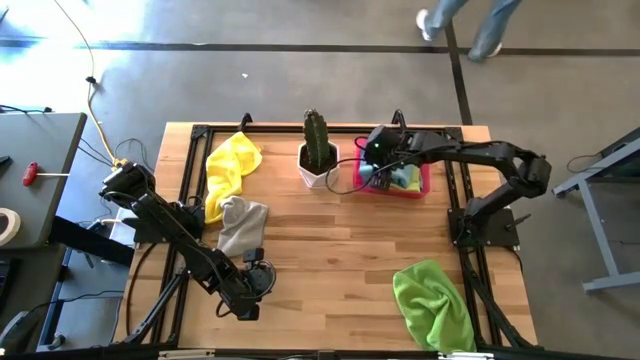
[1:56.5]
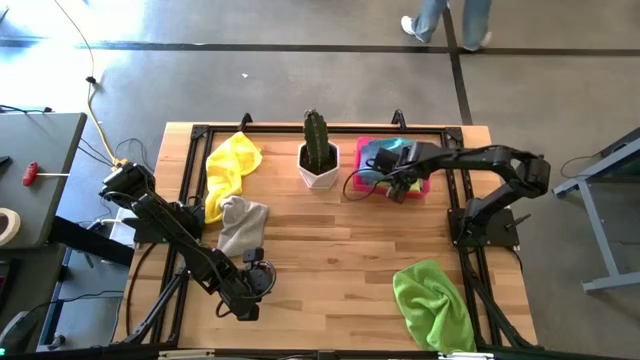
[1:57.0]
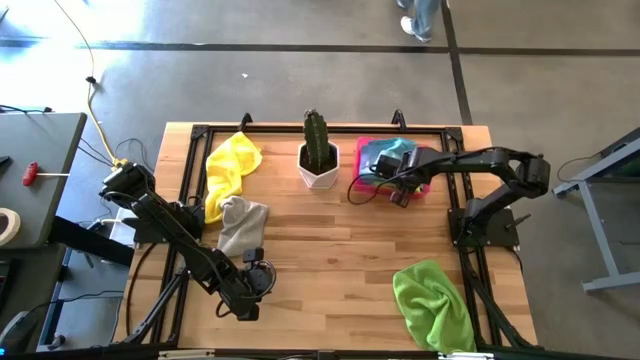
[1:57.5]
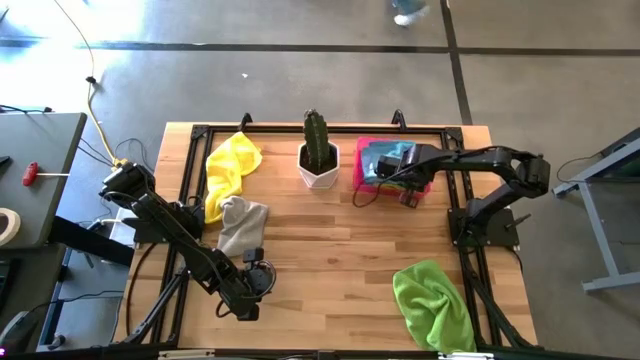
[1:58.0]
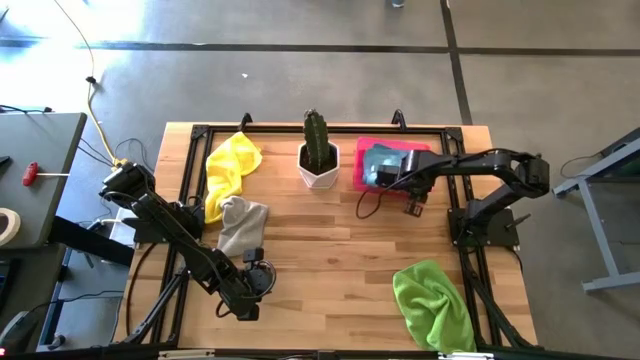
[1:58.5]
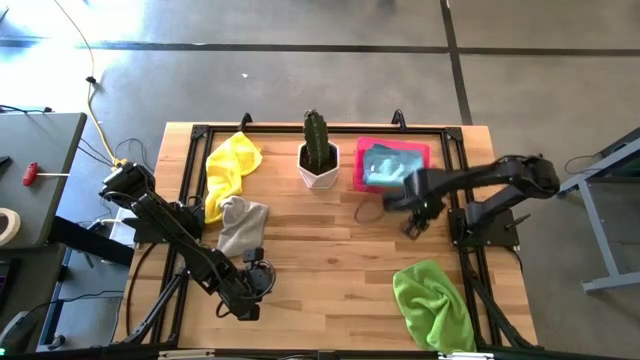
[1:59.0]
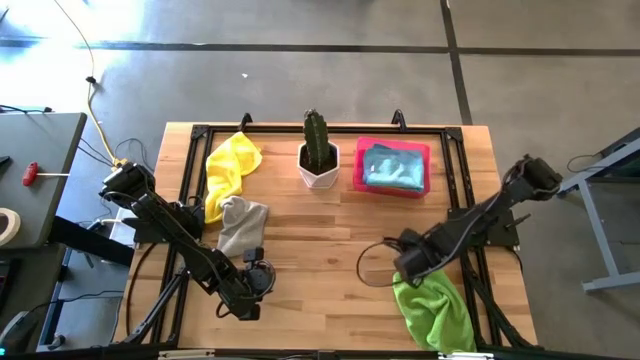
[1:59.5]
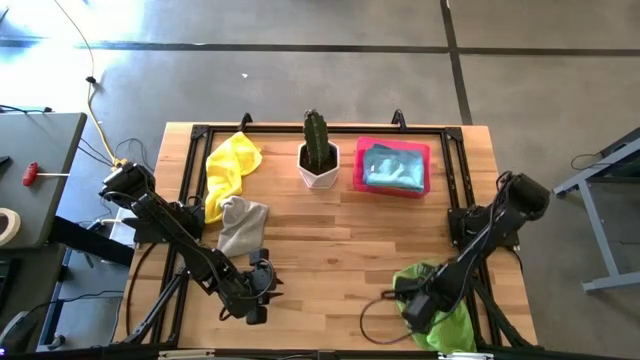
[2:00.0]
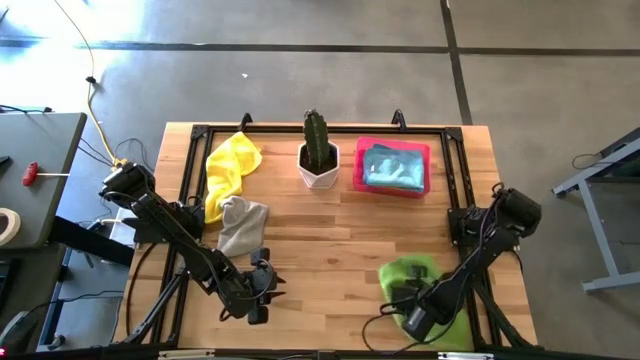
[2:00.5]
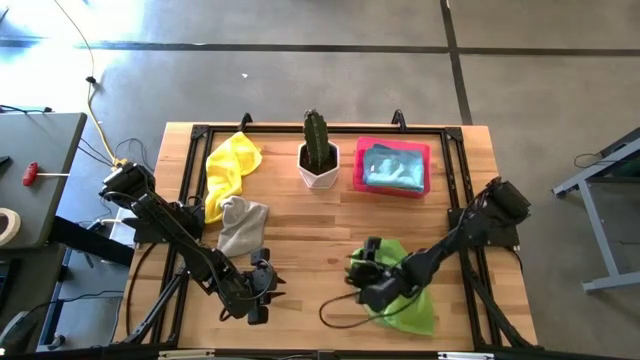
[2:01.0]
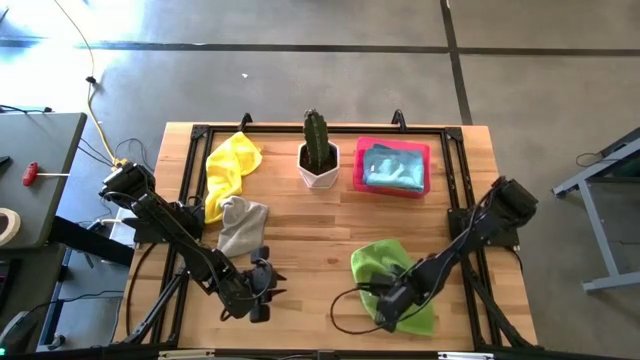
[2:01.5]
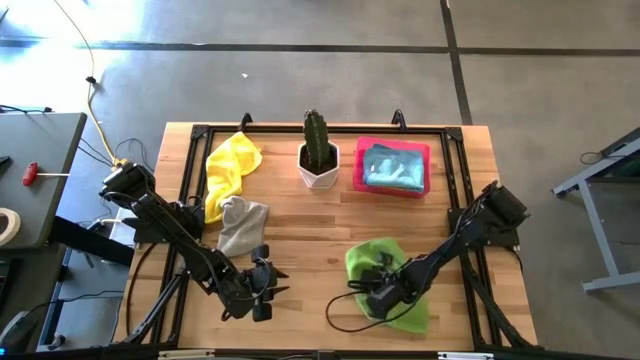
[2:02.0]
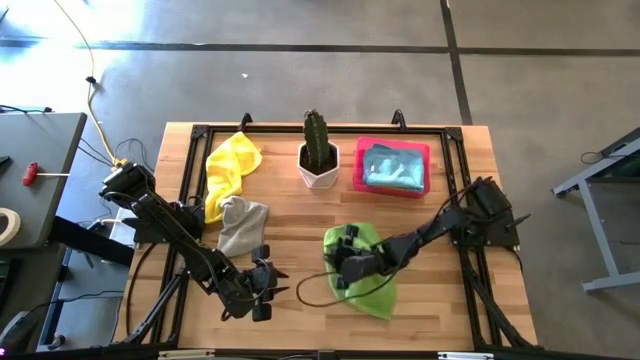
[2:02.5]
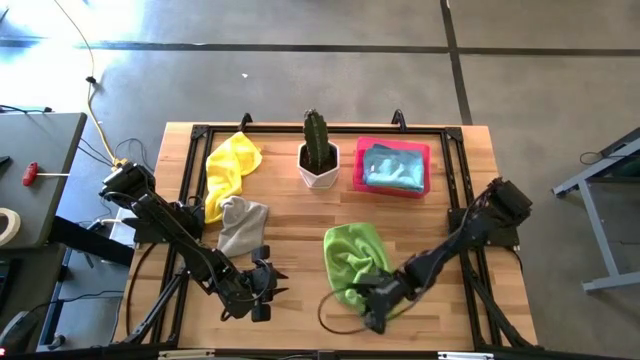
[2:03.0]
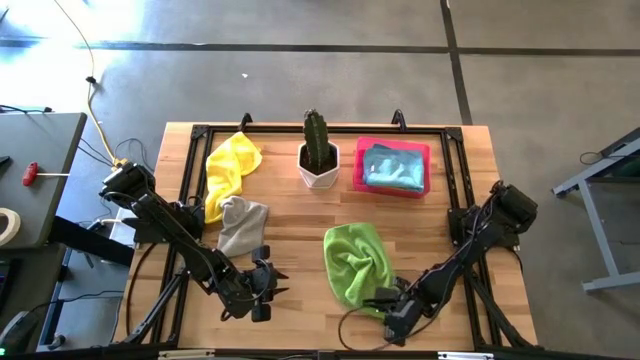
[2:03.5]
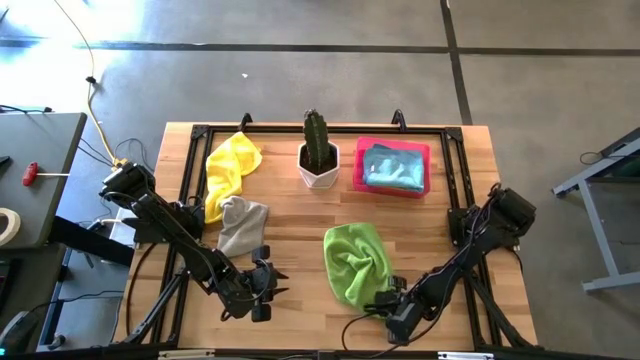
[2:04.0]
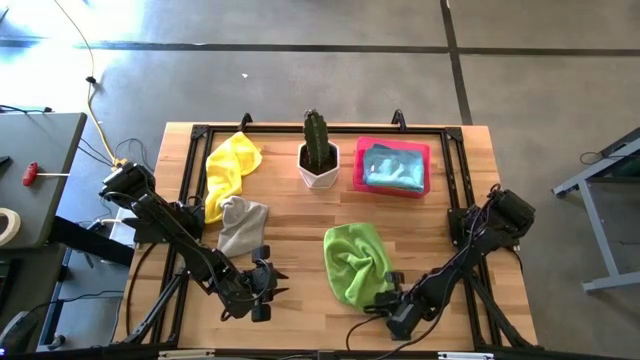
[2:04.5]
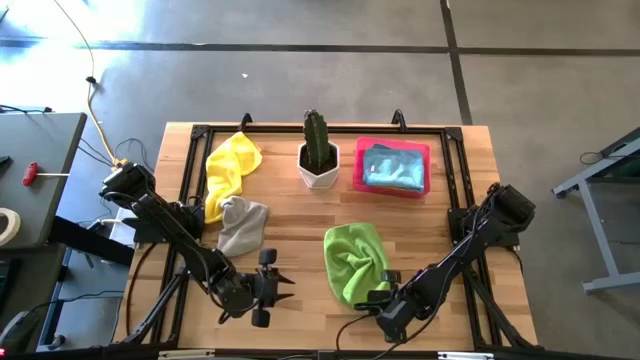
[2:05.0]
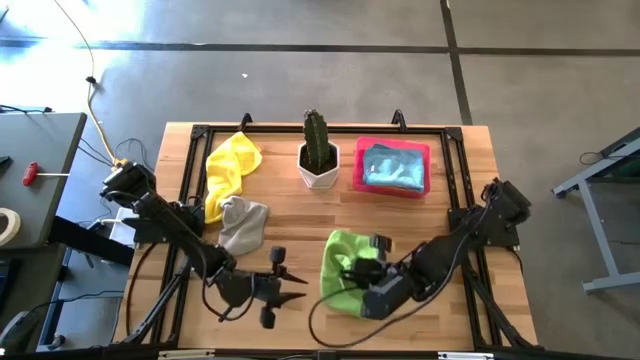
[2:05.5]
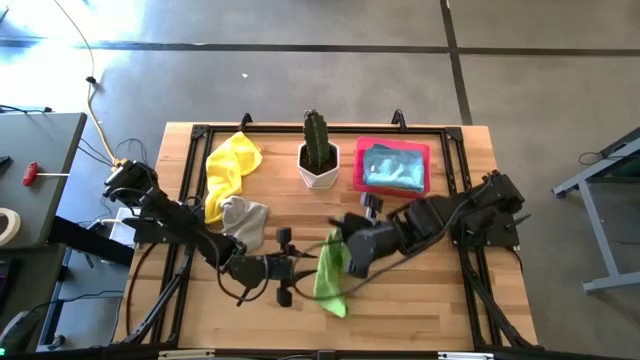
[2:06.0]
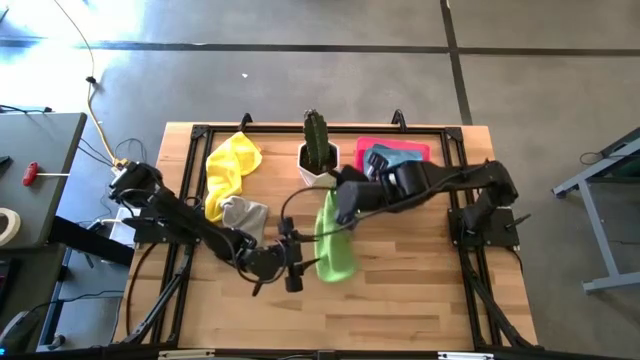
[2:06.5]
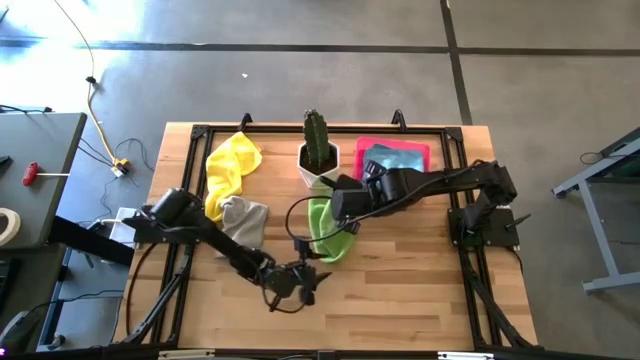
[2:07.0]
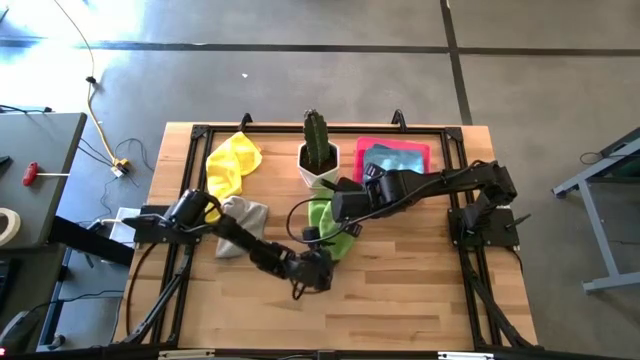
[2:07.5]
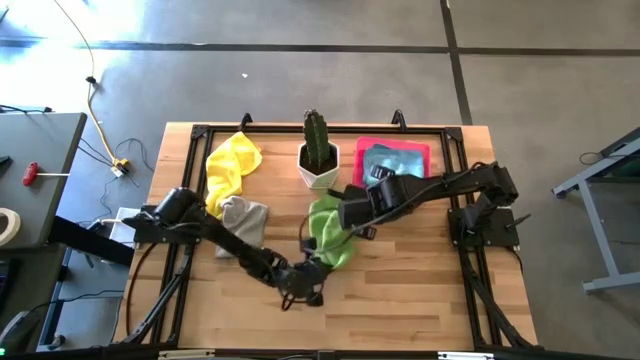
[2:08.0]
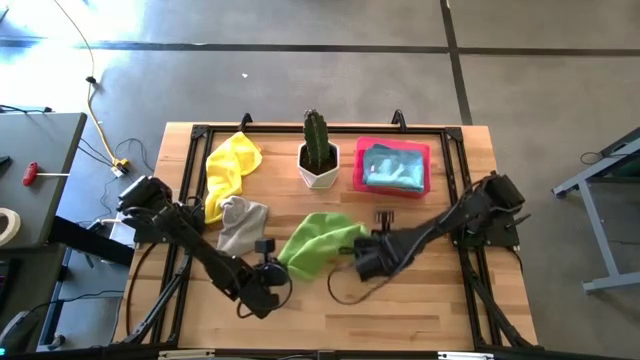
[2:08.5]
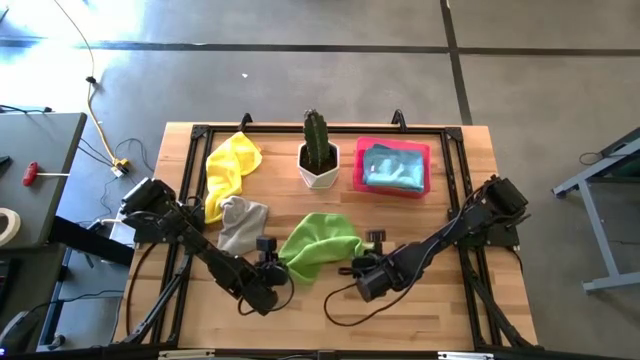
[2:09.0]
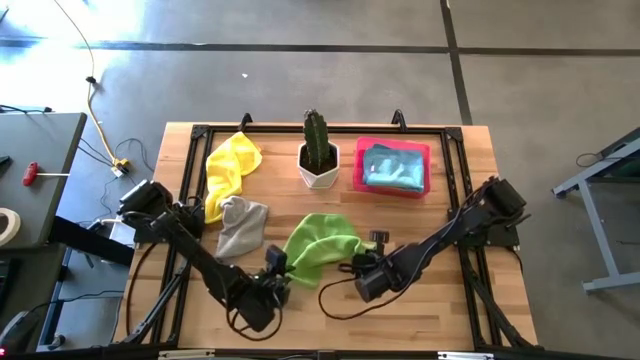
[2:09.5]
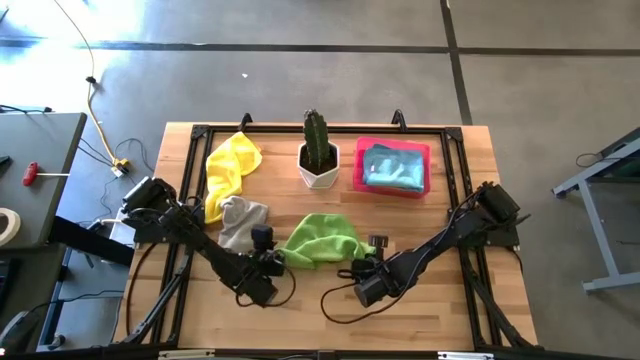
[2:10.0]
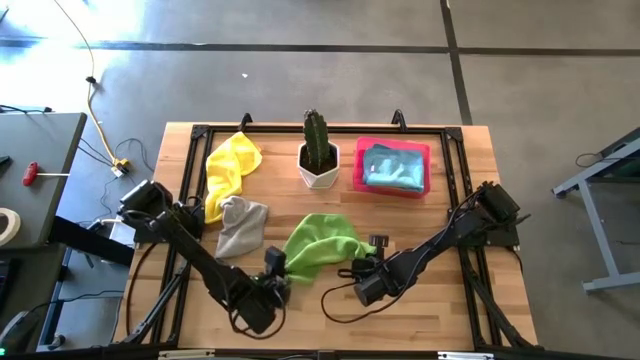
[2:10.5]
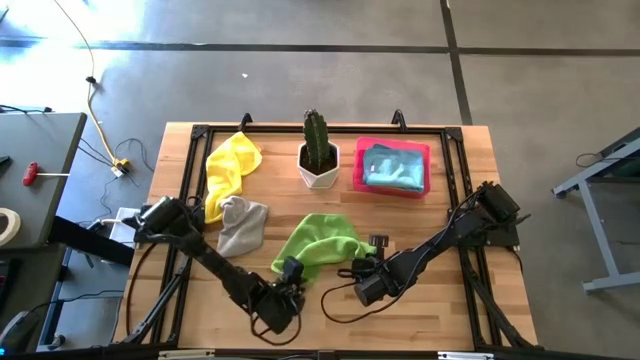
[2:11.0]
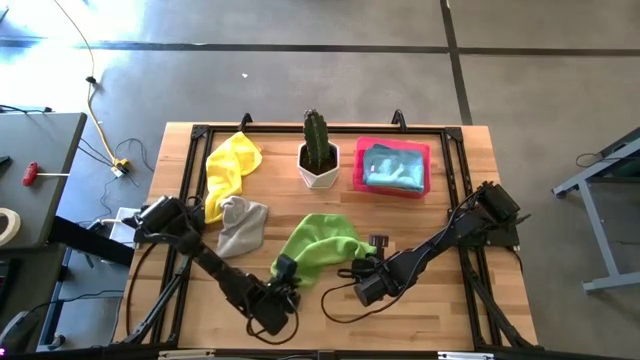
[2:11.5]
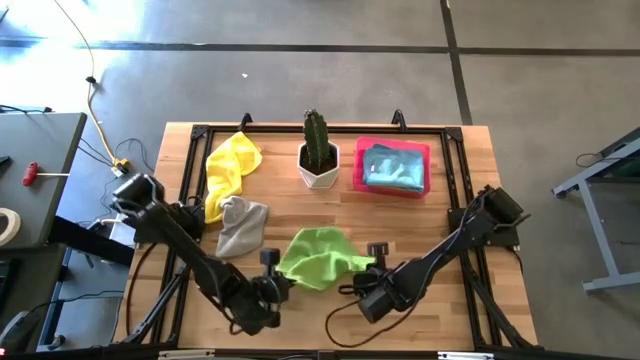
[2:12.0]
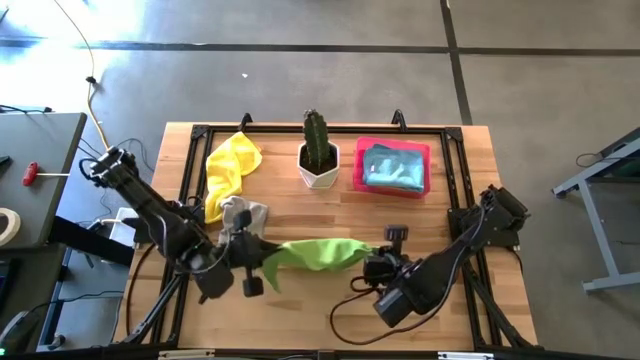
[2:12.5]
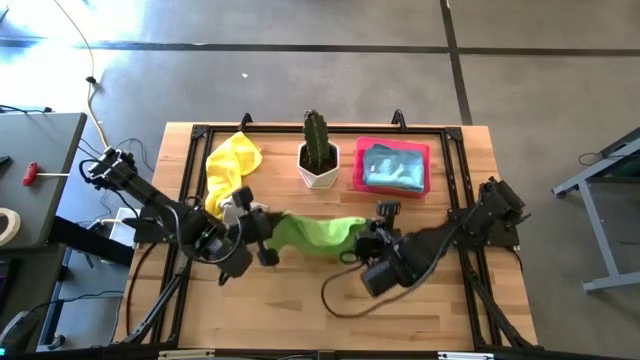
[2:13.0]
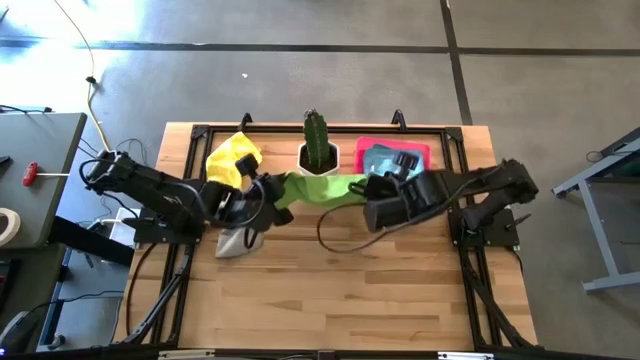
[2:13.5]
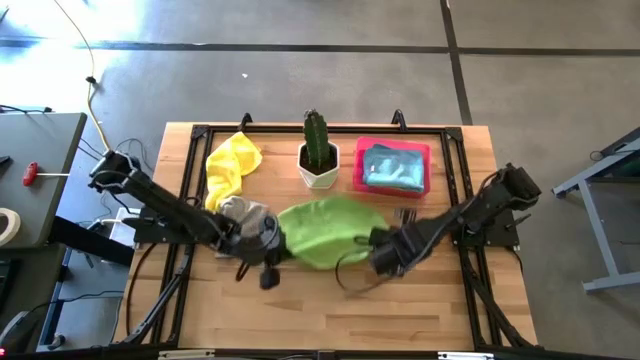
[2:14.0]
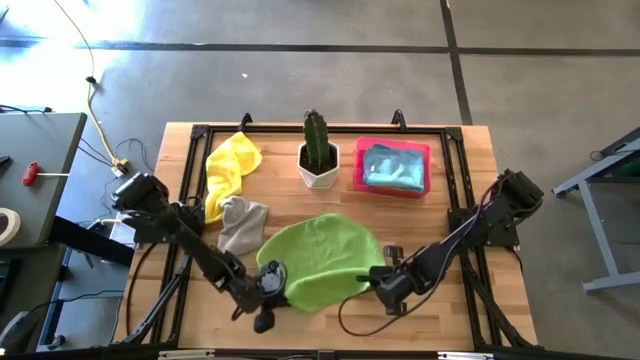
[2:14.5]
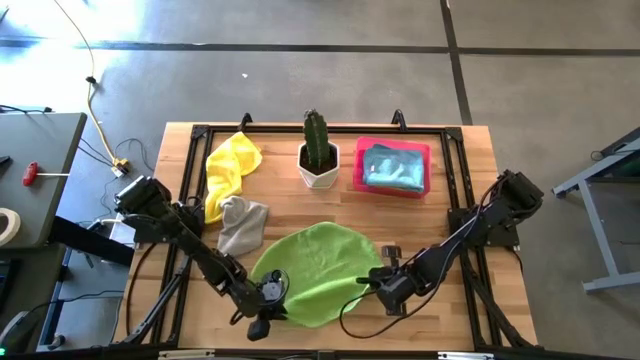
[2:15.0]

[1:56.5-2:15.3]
Task: Fold microfiber towels
Fold the yellow green towel

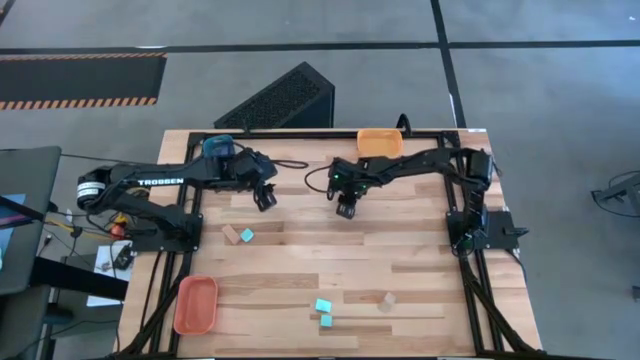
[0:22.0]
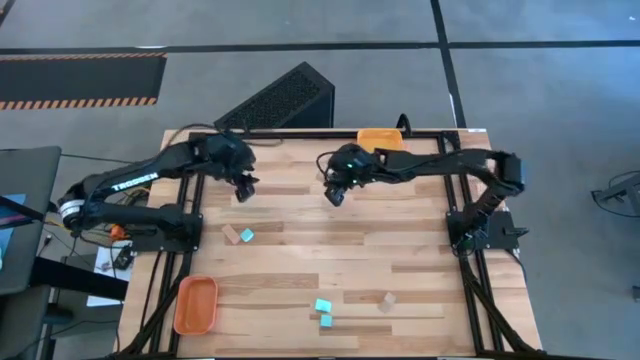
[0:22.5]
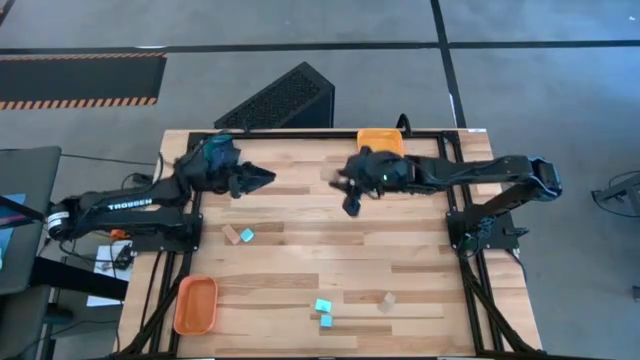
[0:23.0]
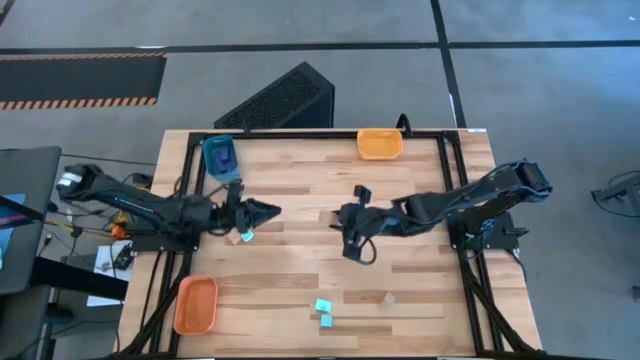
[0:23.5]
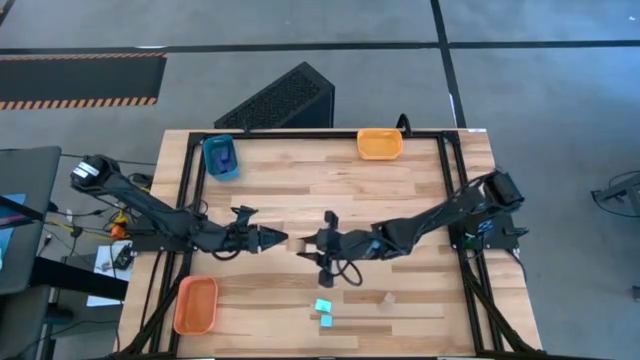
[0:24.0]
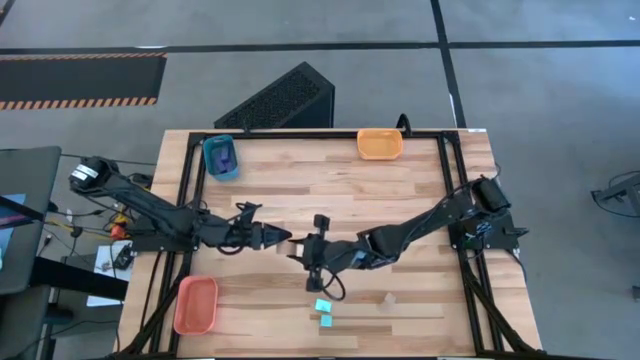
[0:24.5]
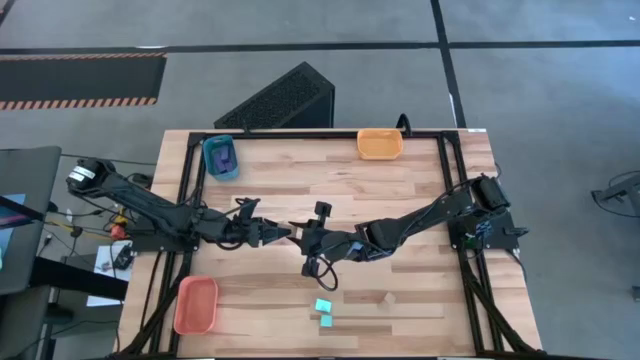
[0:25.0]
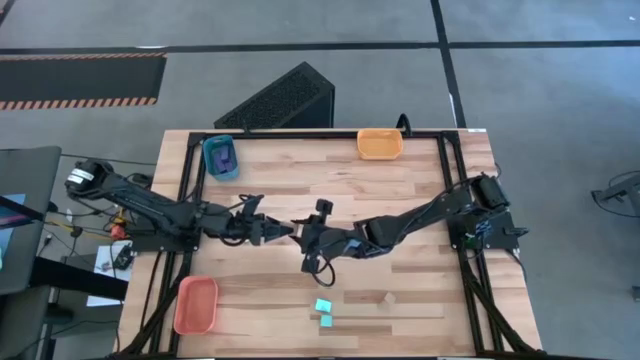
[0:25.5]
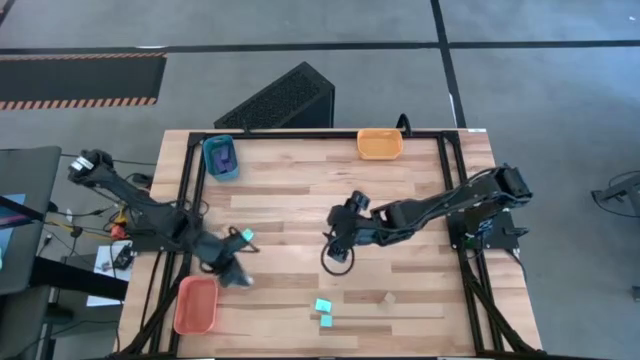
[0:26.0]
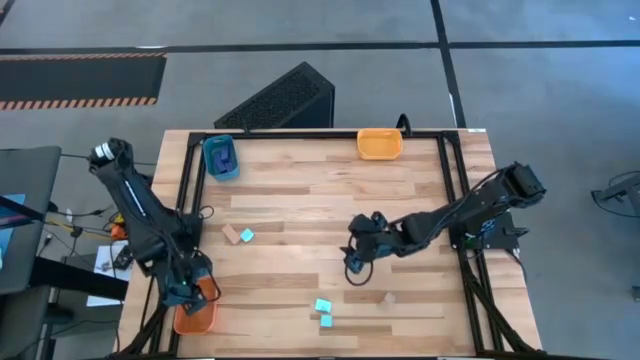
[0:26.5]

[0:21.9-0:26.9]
Task: Sort & place blocks by color
Put the top right brown block into the orange bin
